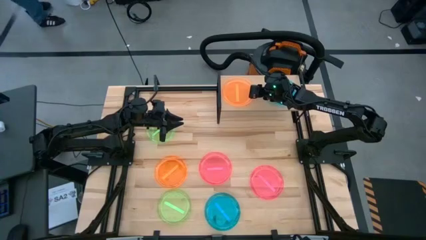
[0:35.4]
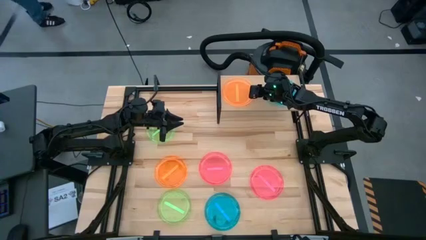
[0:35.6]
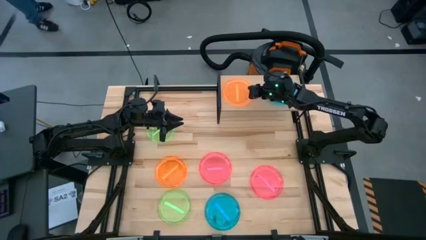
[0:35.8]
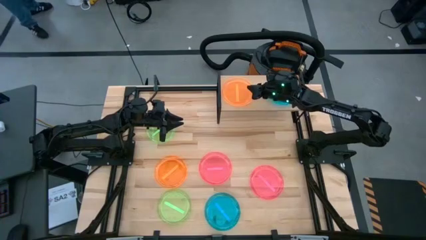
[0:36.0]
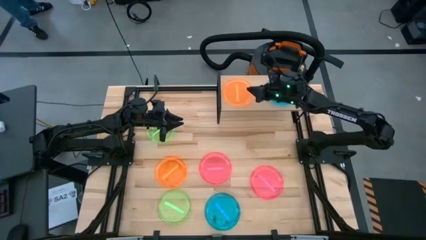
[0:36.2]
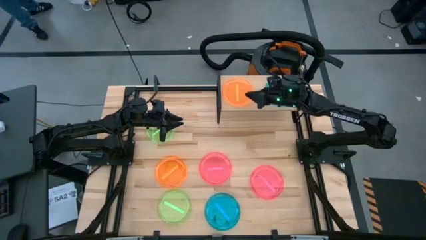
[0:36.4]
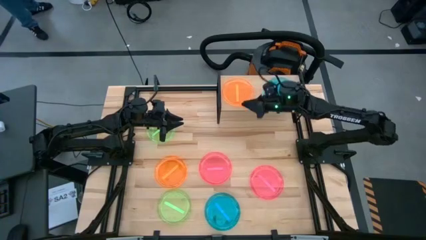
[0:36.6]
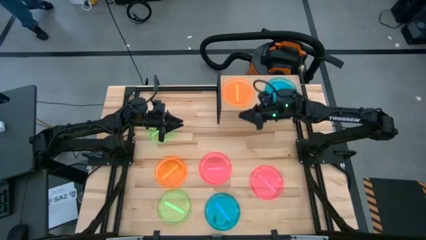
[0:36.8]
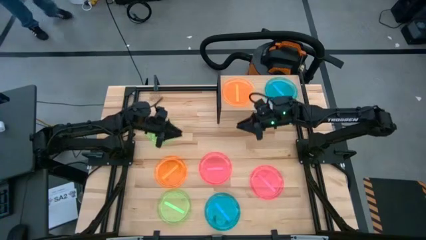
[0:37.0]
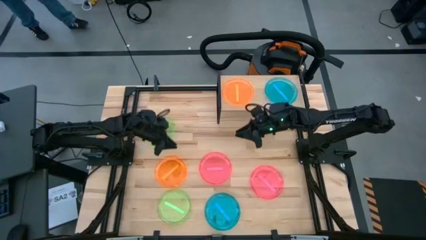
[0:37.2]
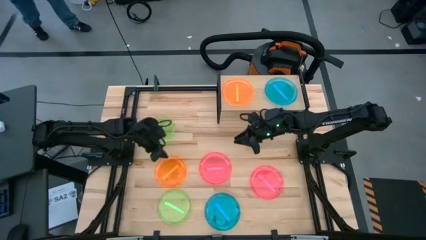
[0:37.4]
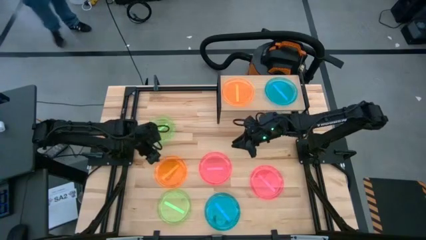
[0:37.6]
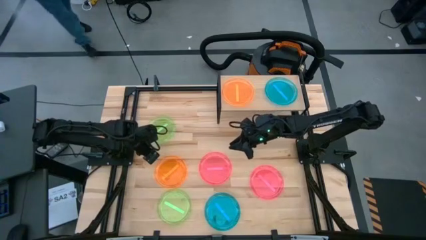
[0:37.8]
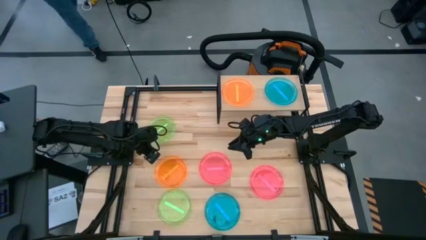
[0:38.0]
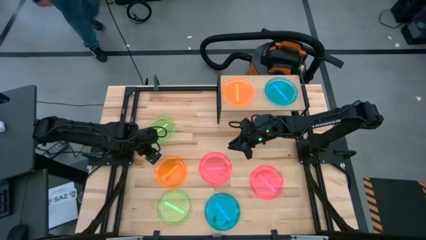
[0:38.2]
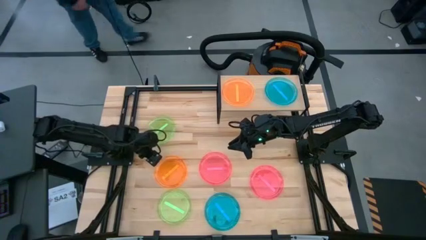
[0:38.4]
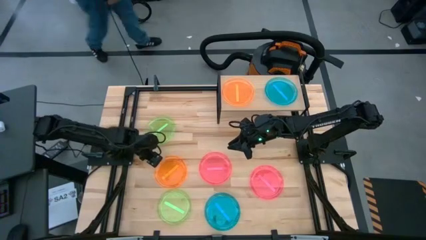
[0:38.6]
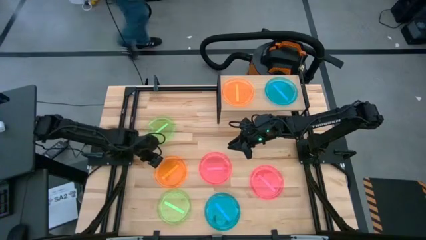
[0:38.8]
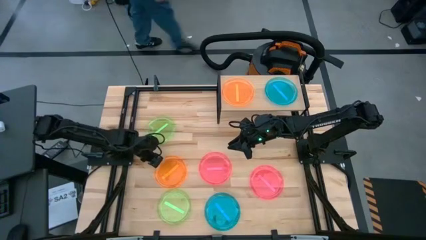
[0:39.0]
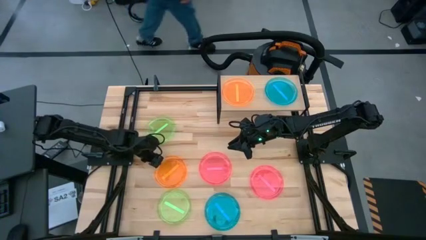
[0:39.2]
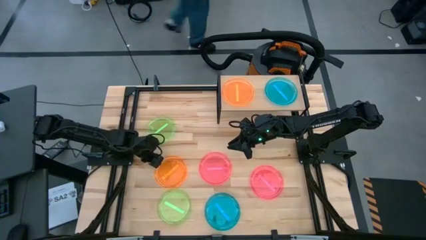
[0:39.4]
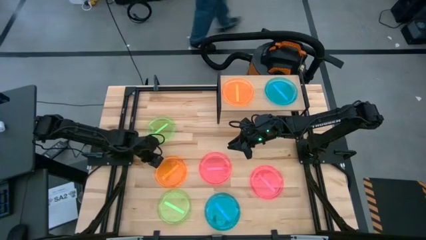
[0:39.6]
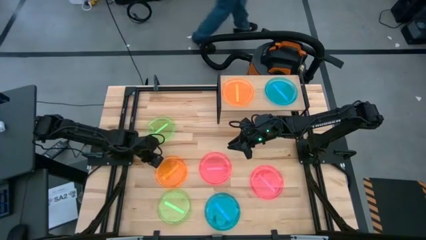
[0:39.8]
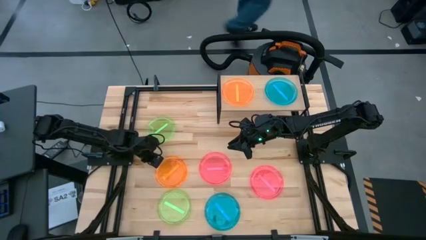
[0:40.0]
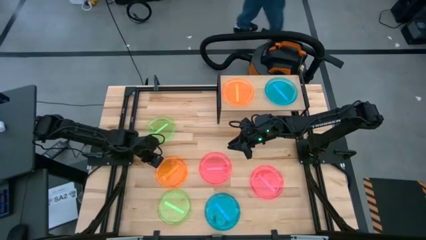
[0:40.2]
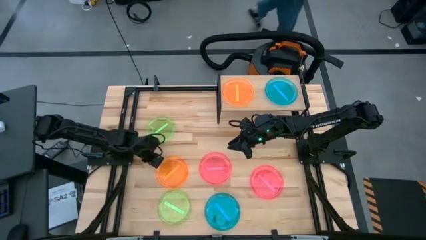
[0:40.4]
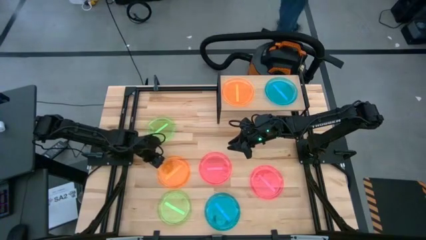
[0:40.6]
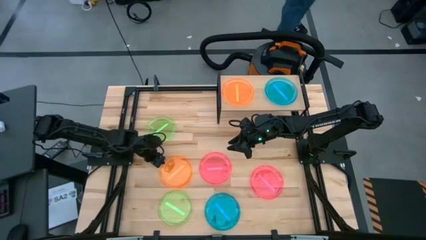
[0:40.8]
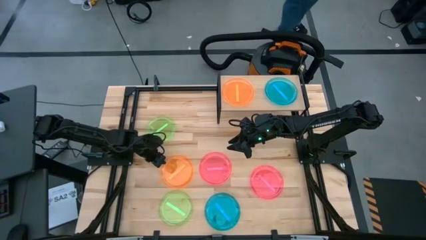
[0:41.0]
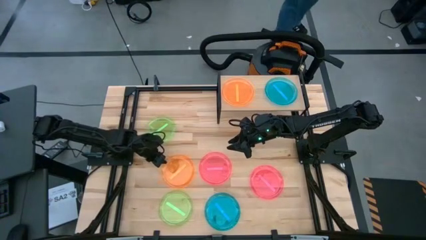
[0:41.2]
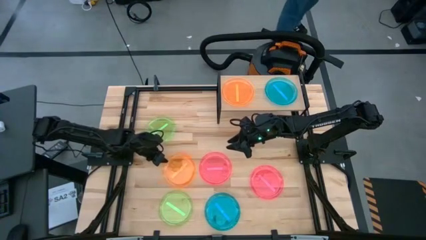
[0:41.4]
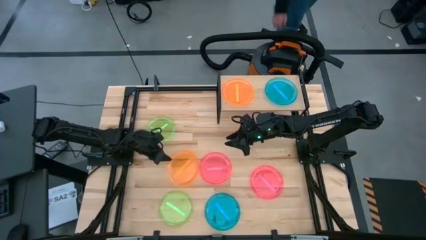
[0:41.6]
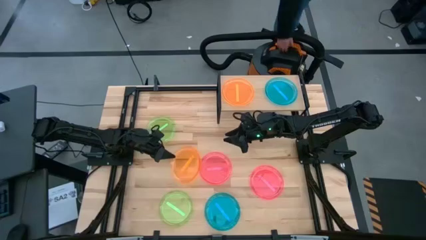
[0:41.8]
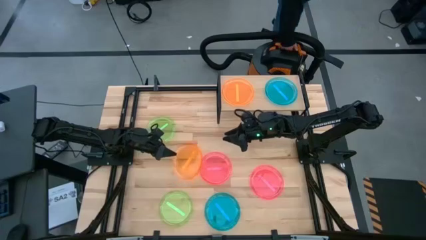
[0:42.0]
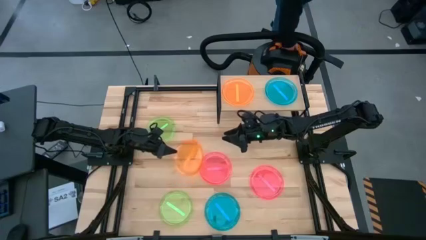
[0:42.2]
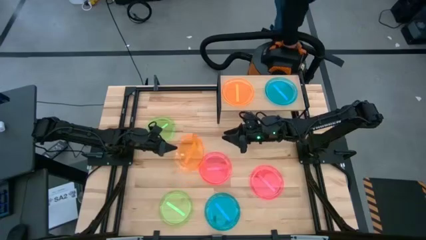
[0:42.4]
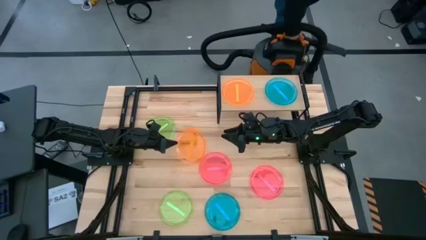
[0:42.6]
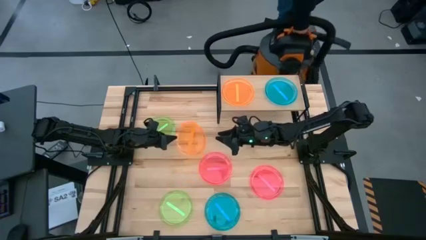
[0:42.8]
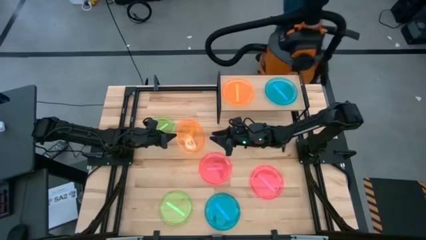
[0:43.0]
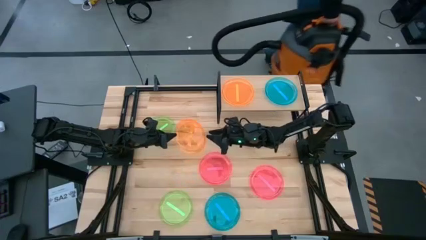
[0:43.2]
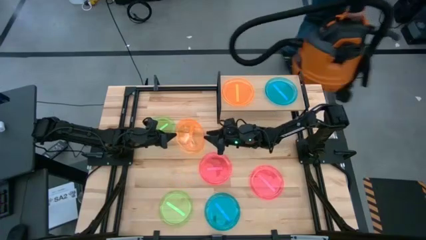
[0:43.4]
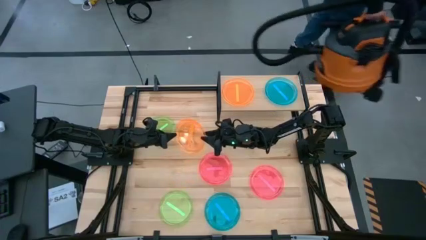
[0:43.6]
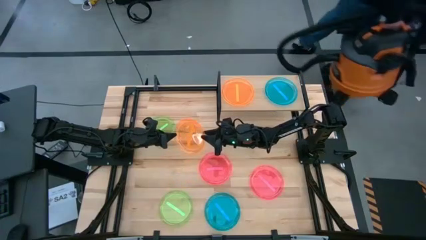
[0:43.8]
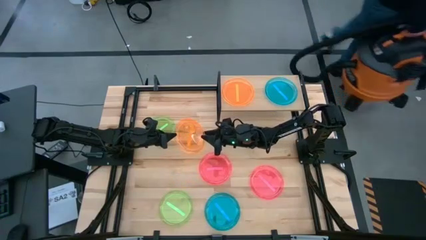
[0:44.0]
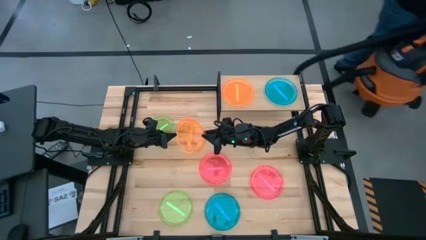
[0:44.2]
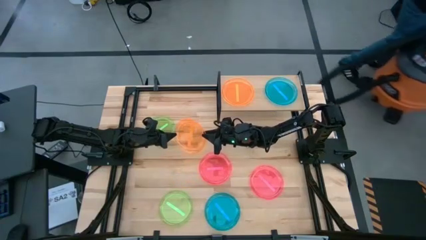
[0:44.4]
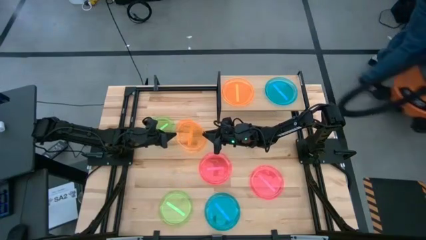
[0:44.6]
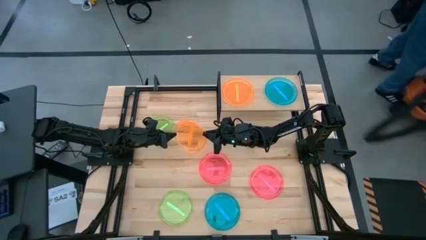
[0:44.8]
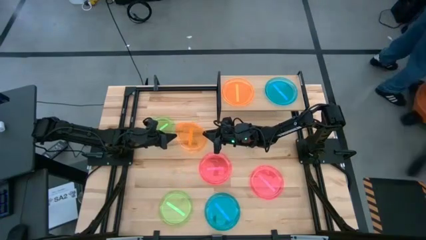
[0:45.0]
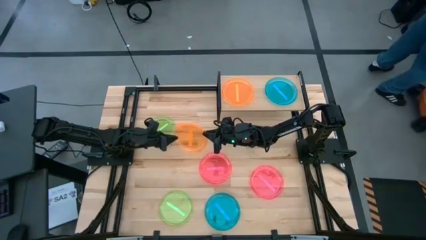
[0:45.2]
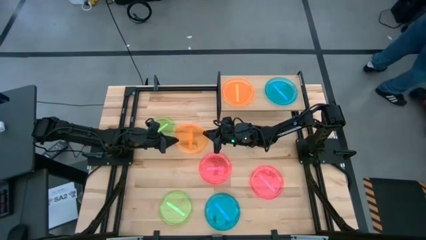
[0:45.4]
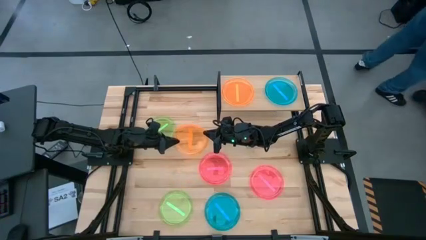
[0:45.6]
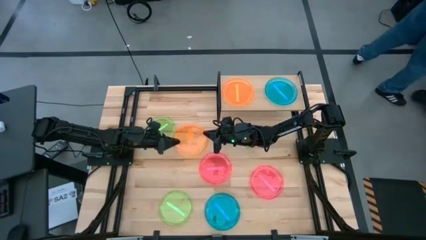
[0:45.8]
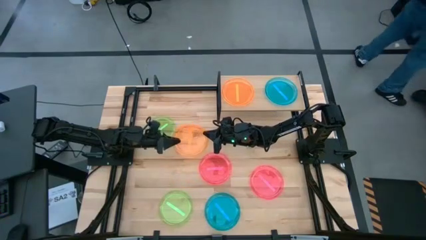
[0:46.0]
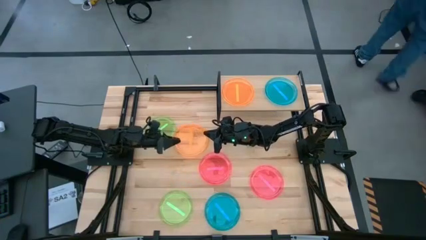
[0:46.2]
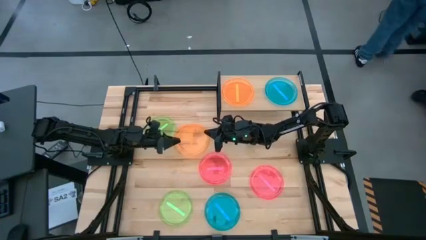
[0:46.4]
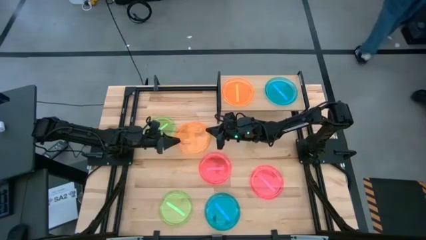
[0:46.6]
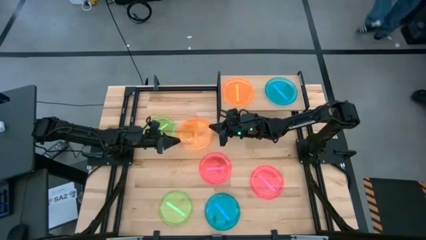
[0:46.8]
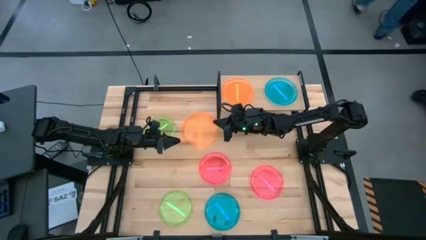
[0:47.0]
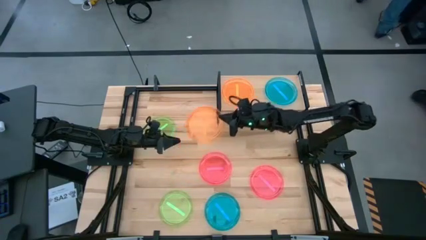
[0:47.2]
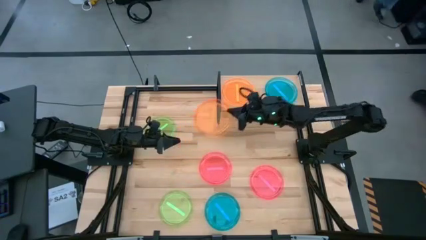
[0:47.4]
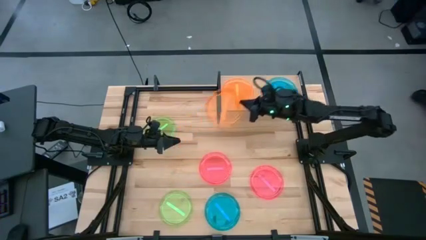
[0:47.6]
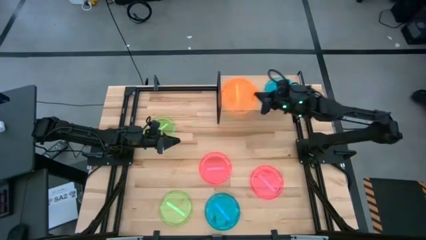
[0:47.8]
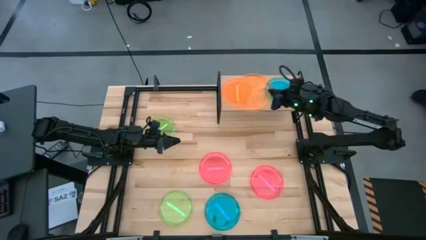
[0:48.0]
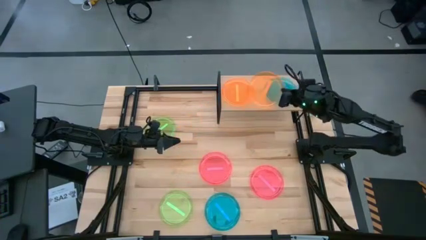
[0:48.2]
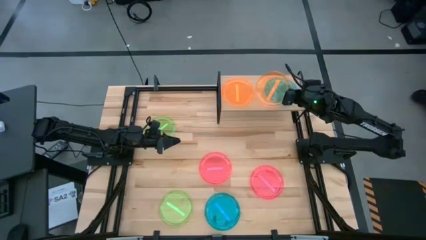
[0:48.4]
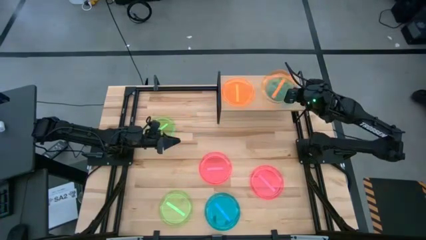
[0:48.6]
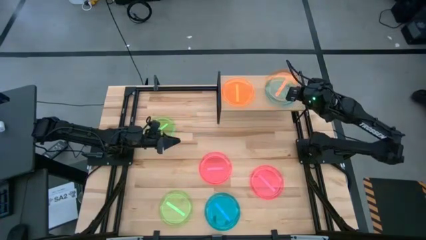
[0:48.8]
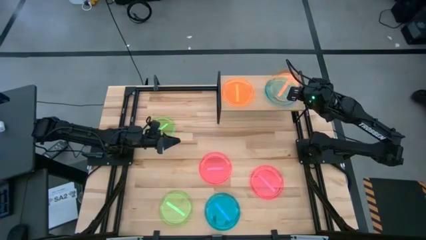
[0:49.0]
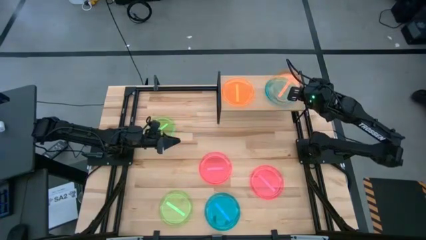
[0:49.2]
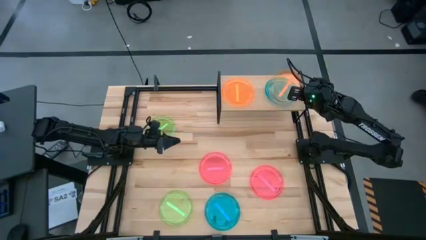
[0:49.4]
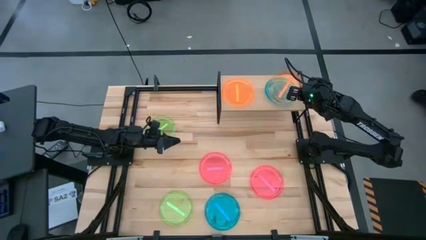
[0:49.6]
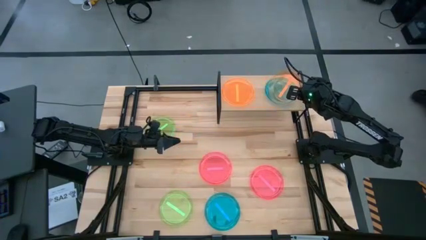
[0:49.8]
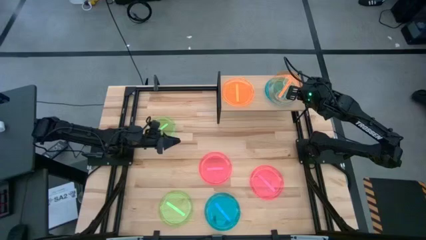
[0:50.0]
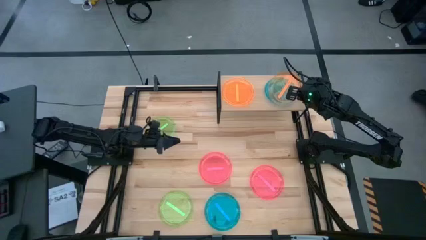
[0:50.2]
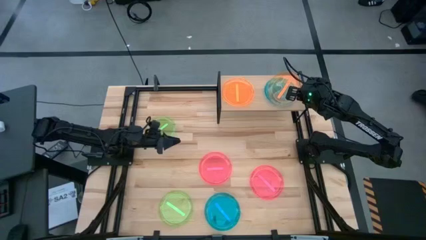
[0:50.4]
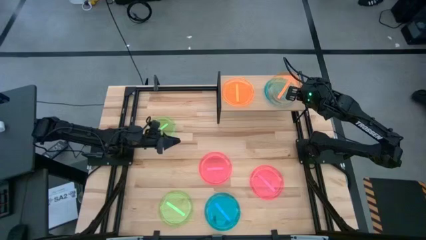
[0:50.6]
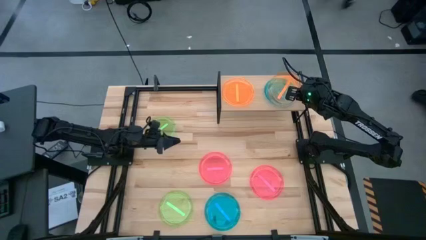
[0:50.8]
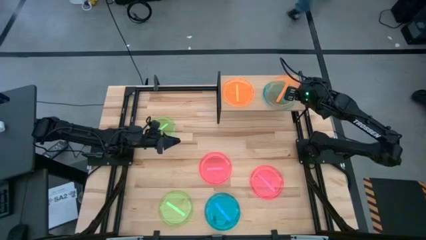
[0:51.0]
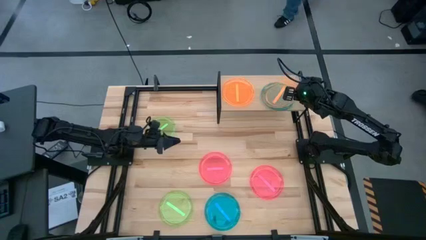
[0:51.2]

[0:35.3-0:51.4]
Task: Place and stack plates onto a shelf
Stack the orange plate on top of the blue plate on the shelf
